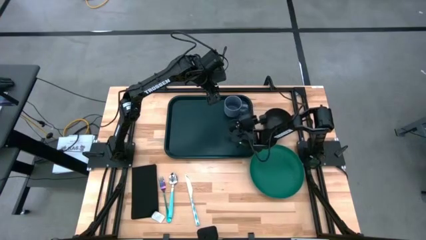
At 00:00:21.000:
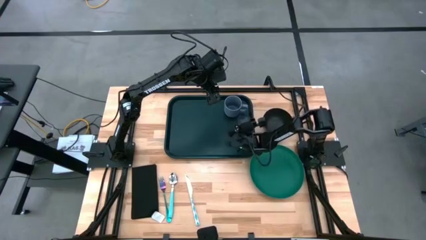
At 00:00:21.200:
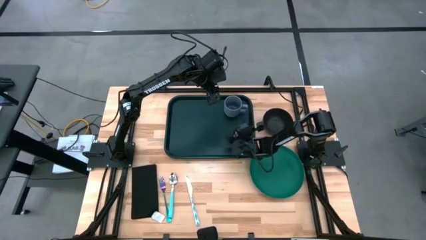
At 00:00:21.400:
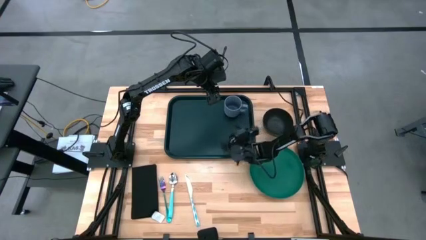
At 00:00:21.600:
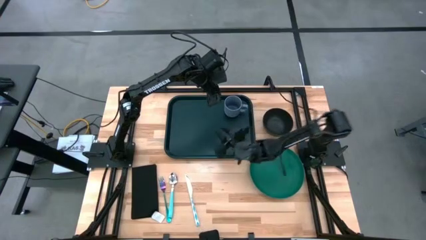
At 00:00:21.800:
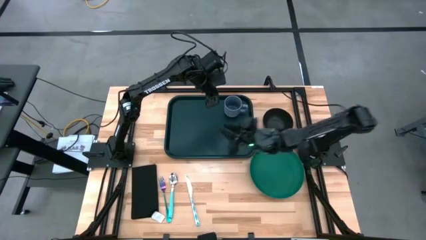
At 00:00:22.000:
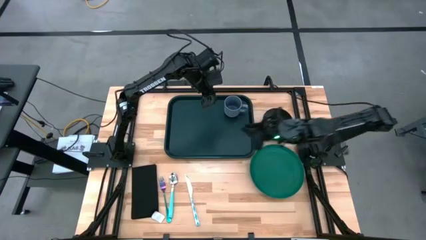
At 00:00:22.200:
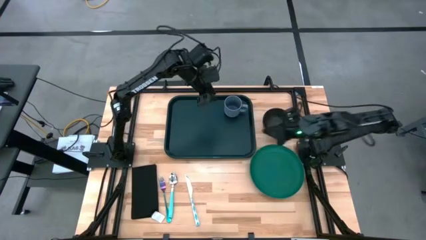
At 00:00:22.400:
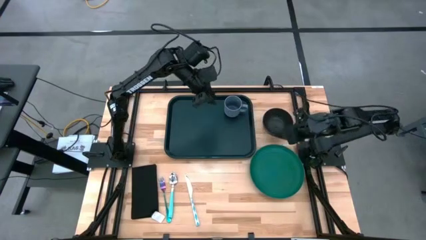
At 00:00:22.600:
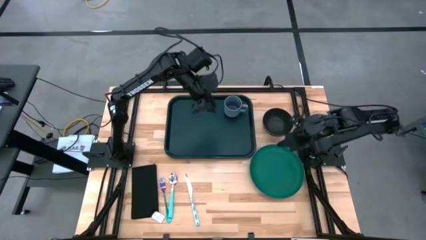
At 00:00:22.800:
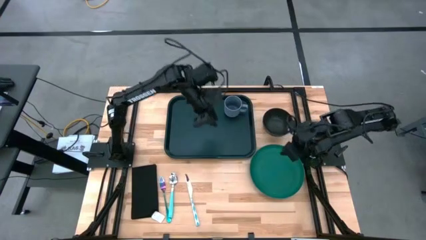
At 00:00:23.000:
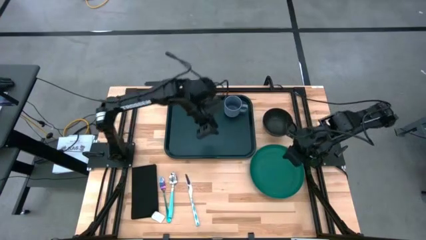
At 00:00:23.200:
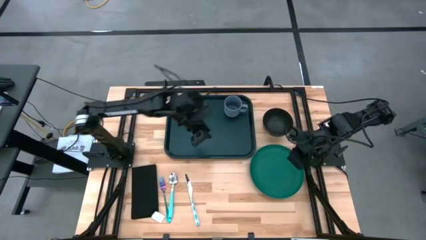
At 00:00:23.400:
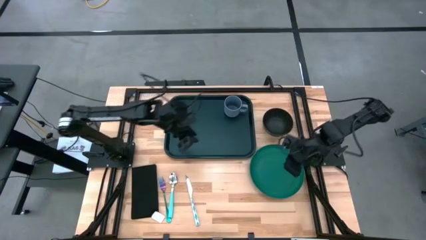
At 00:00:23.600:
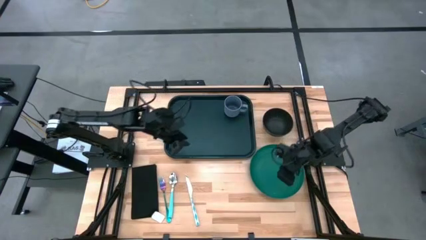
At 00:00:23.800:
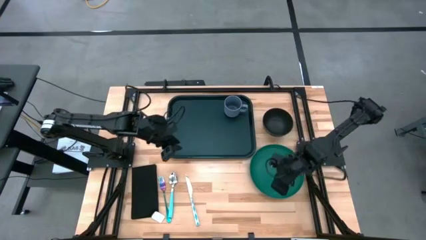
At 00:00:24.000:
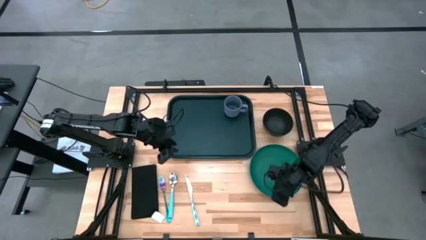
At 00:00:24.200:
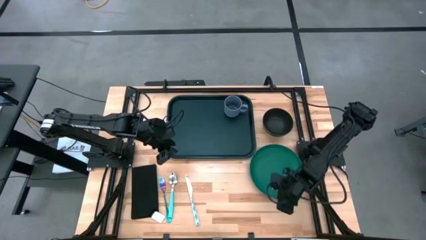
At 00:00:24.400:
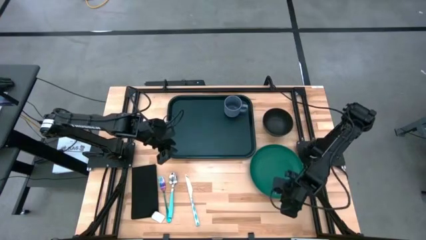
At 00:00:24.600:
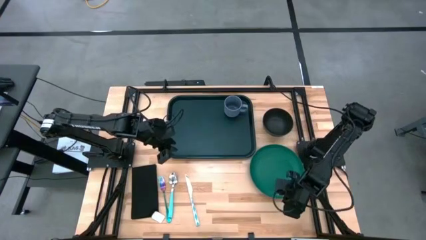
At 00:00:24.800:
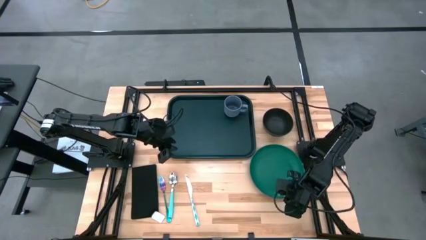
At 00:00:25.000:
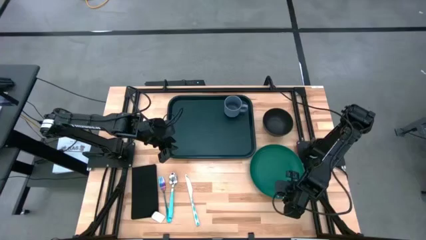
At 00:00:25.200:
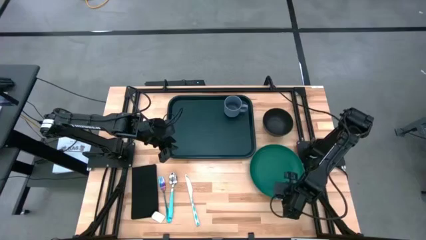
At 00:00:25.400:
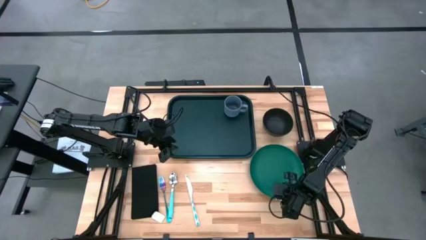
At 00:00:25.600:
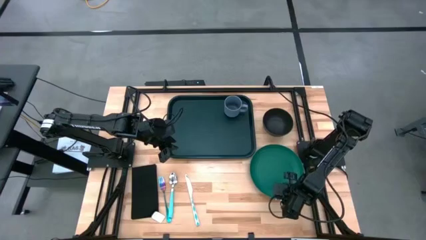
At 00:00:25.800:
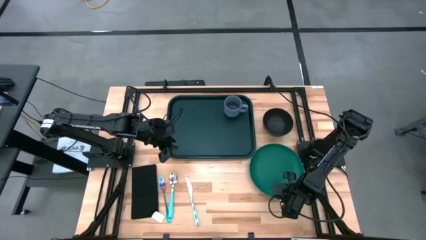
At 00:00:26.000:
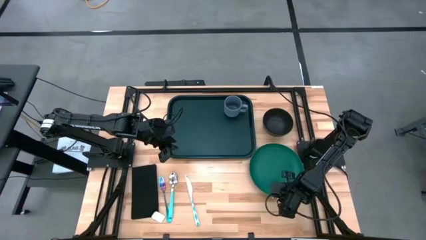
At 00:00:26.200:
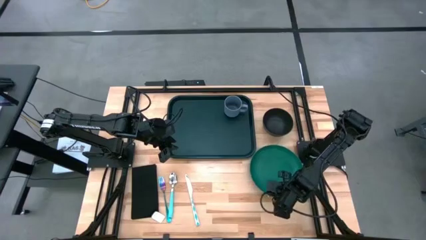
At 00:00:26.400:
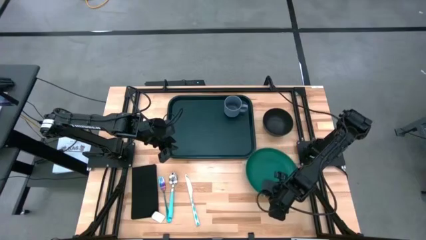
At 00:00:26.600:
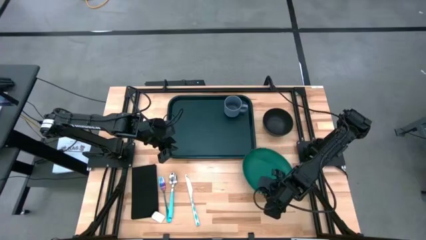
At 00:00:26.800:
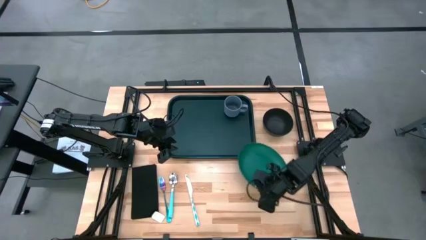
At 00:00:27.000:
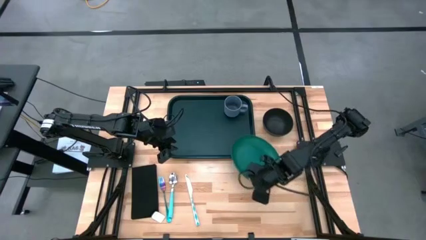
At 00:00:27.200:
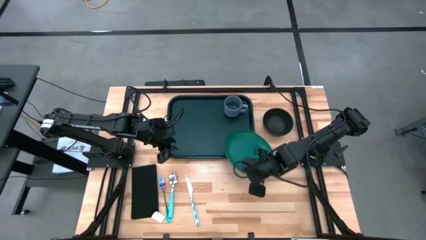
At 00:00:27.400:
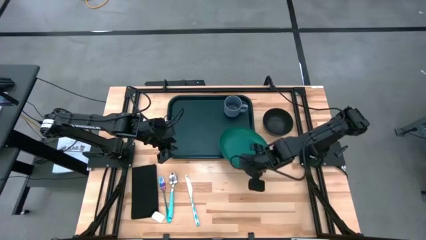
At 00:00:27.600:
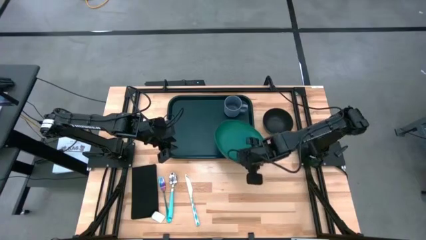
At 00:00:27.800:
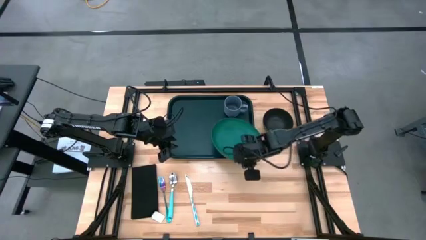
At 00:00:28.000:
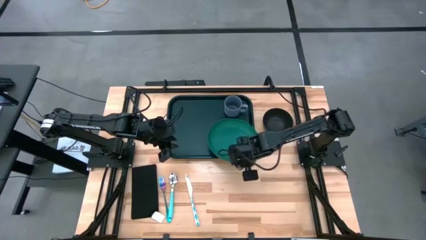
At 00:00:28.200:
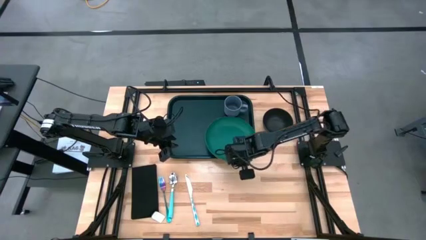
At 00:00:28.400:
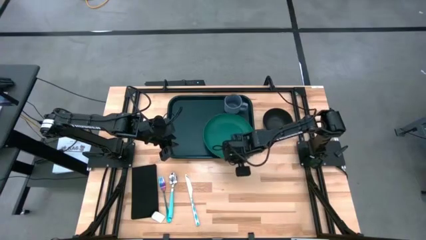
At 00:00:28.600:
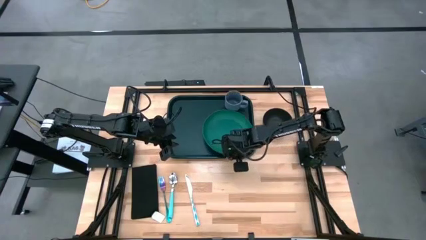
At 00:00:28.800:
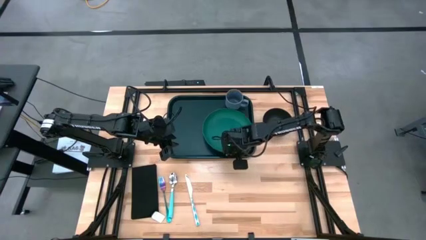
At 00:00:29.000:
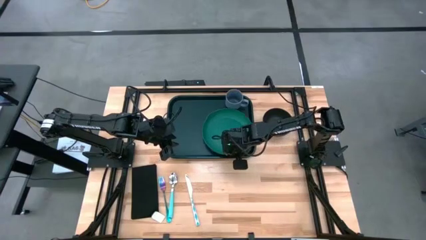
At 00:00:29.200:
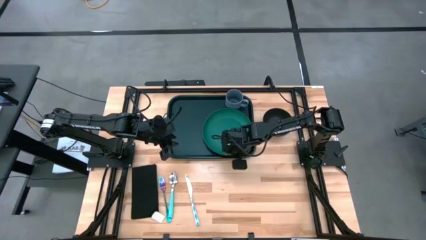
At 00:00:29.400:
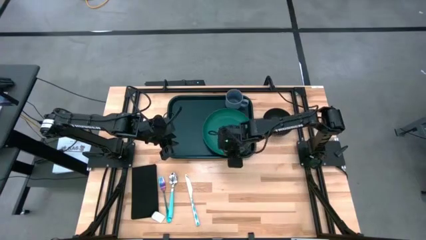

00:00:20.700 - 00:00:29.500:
Task: Set up tray
Put the dark green plate on the black serving tray

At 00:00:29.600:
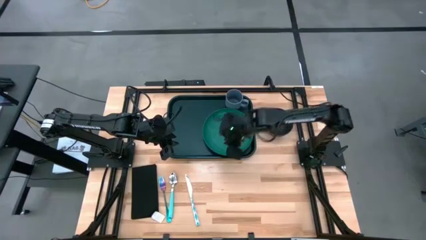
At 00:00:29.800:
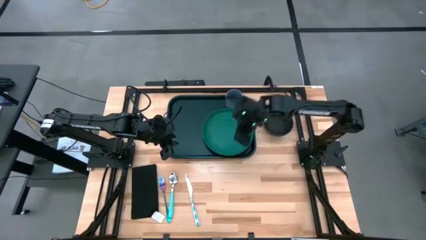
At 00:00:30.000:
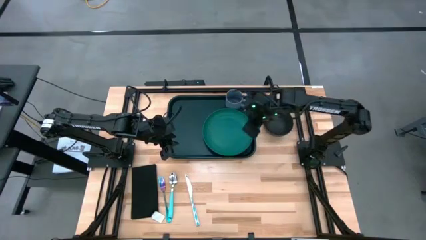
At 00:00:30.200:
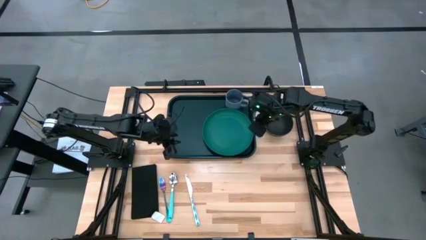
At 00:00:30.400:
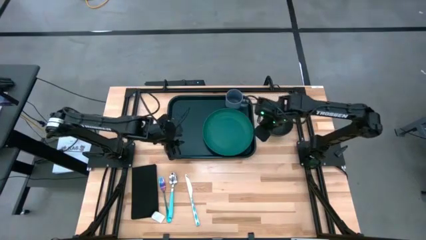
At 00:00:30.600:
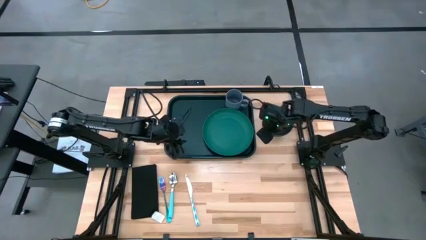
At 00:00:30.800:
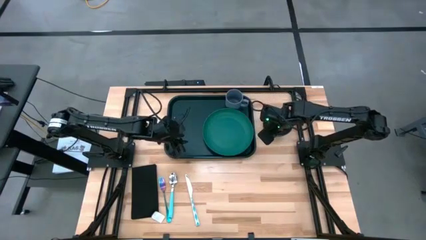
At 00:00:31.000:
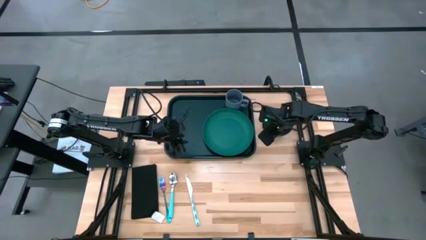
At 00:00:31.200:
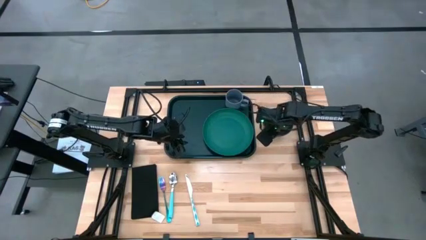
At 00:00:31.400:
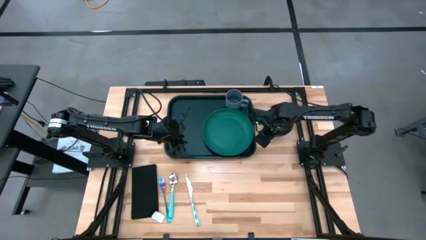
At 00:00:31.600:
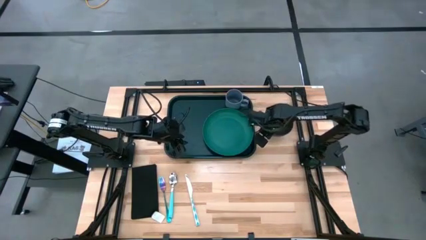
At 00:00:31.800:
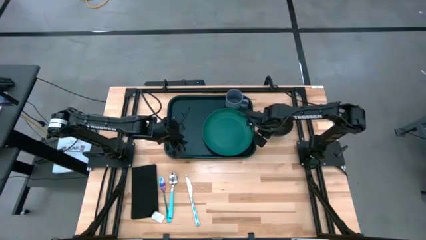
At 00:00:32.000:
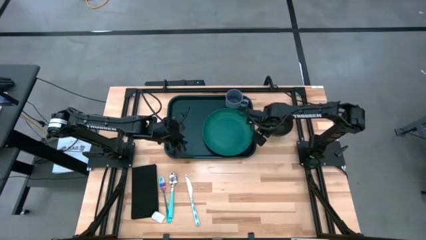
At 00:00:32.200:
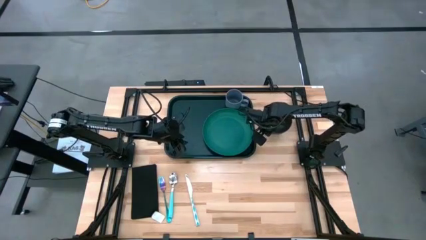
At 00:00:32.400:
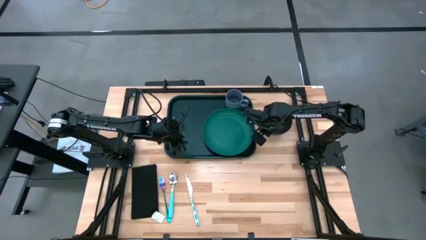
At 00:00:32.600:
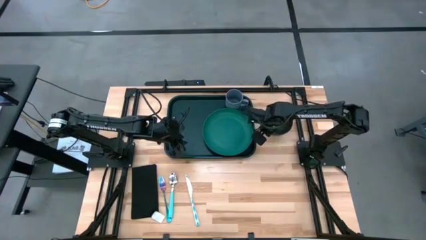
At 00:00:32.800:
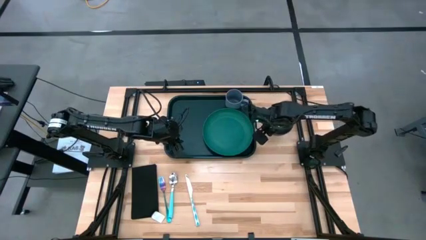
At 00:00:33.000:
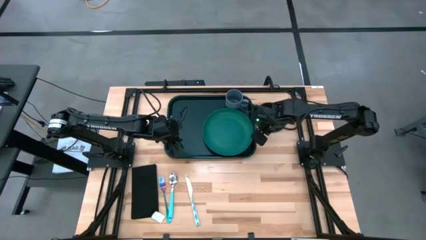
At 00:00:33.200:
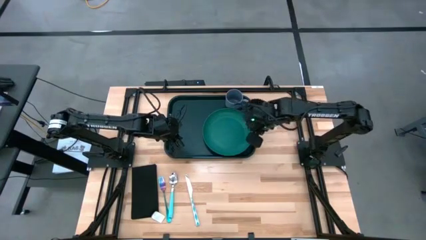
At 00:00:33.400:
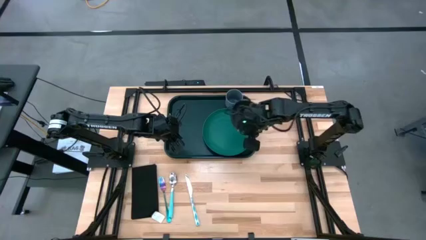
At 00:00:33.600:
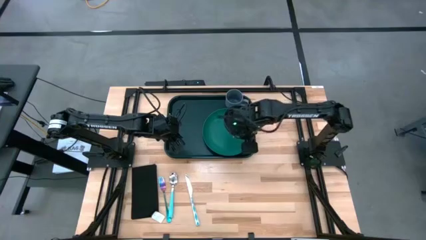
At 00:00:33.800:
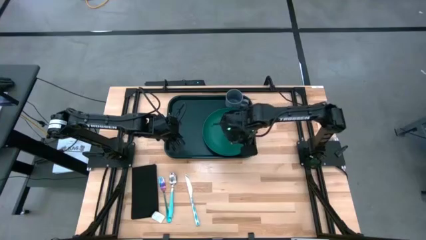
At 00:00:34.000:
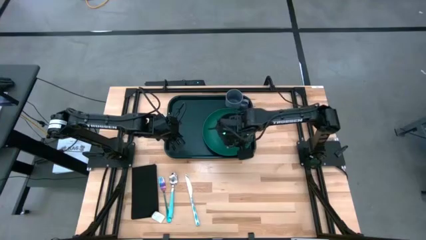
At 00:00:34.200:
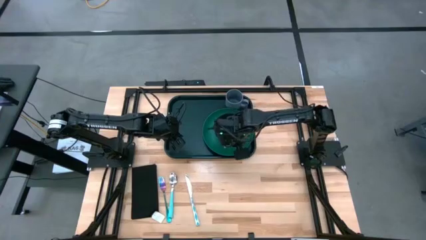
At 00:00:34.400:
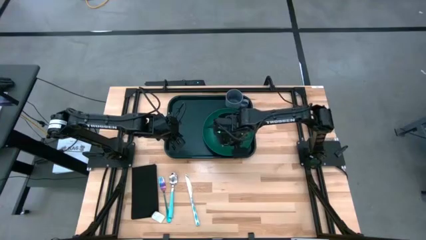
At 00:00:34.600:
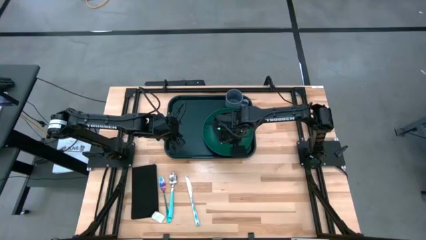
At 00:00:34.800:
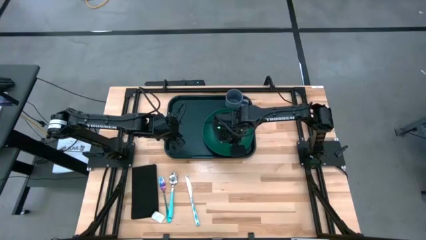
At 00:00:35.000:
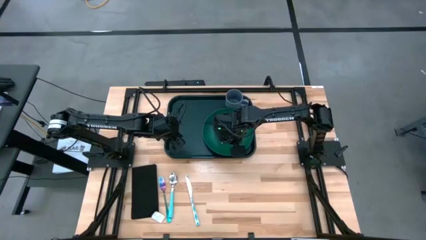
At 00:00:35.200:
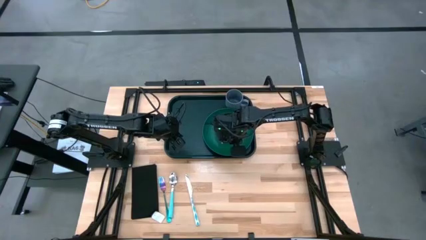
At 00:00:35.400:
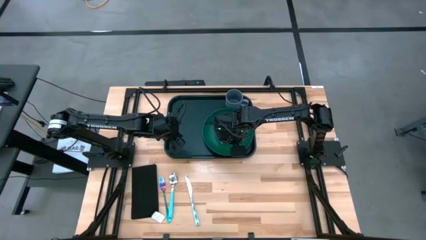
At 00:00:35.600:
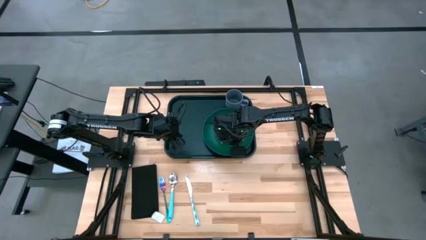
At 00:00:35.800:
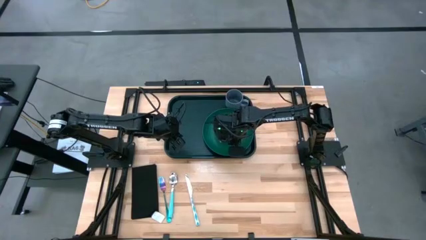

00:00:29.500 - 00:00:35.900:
Put the black bowl on top of the dark green plate on the black serving tray
